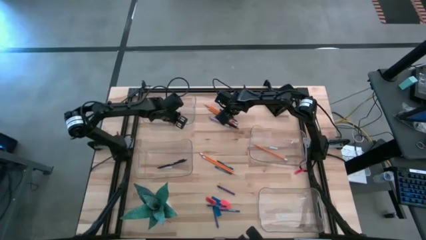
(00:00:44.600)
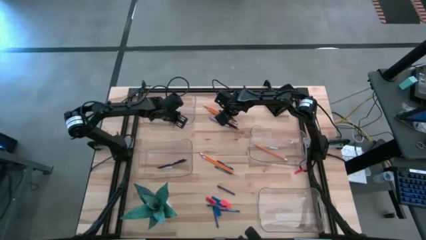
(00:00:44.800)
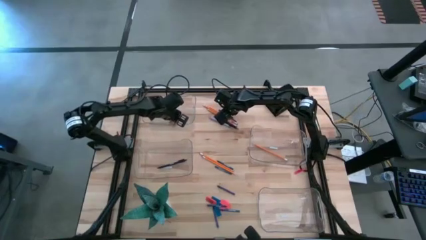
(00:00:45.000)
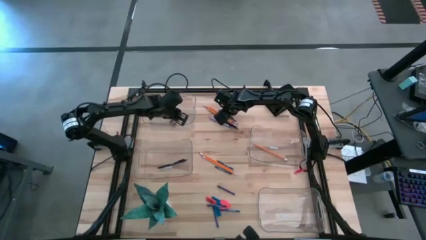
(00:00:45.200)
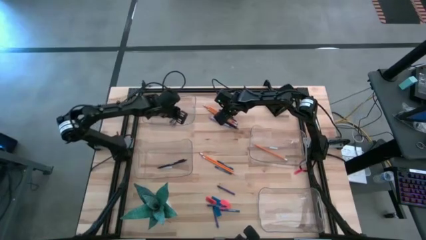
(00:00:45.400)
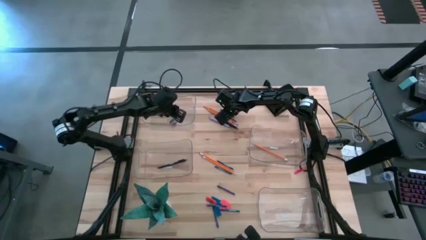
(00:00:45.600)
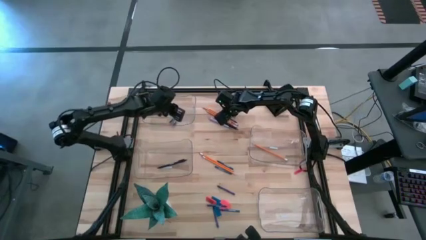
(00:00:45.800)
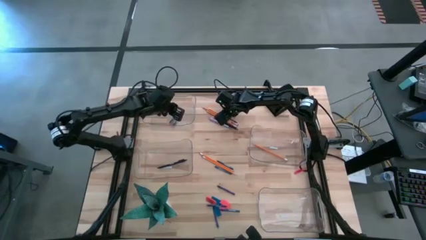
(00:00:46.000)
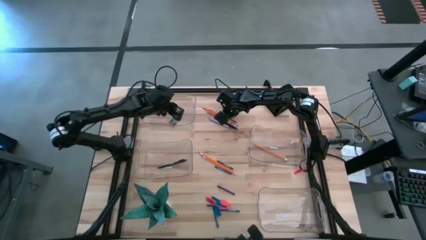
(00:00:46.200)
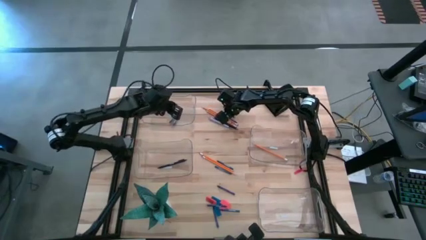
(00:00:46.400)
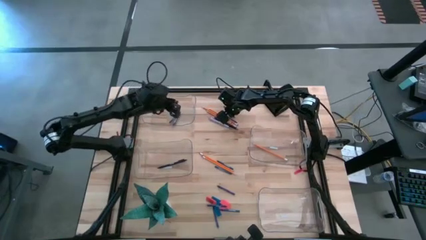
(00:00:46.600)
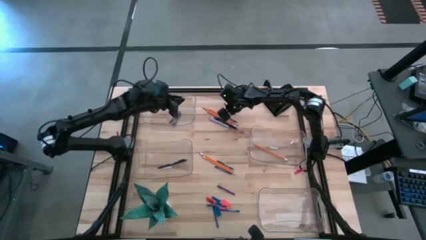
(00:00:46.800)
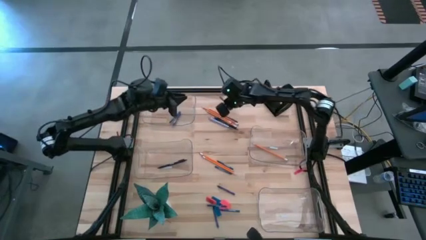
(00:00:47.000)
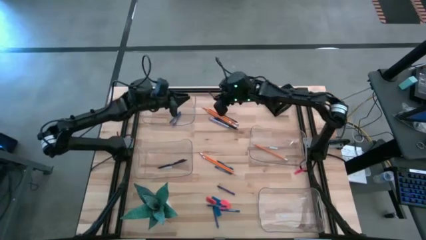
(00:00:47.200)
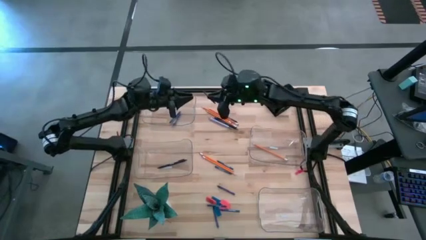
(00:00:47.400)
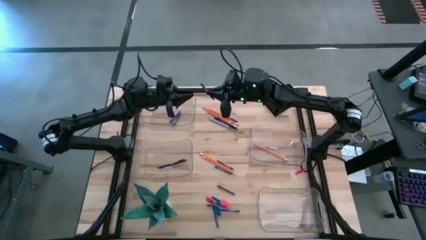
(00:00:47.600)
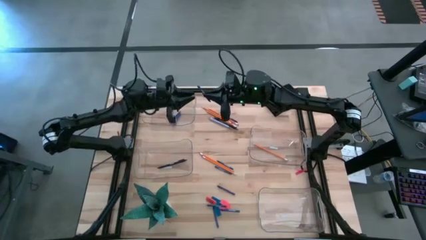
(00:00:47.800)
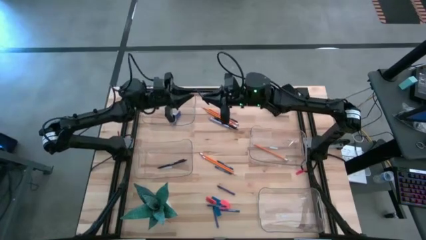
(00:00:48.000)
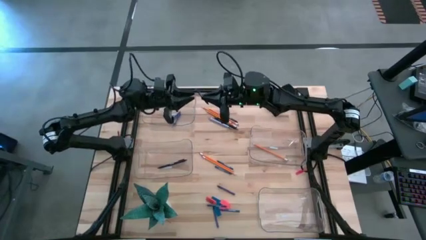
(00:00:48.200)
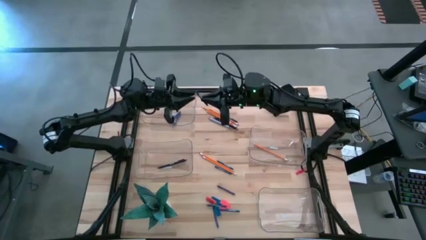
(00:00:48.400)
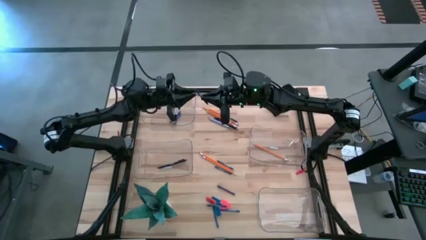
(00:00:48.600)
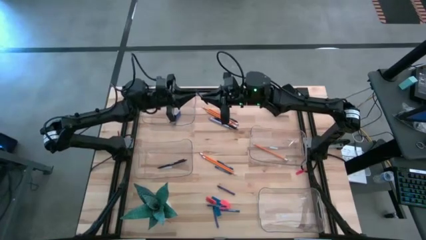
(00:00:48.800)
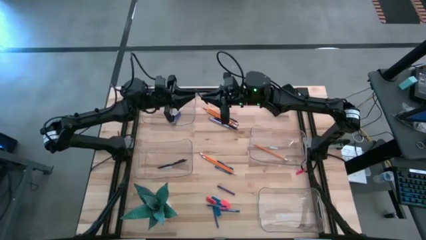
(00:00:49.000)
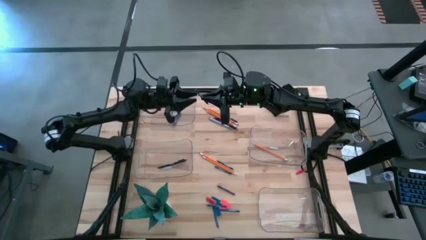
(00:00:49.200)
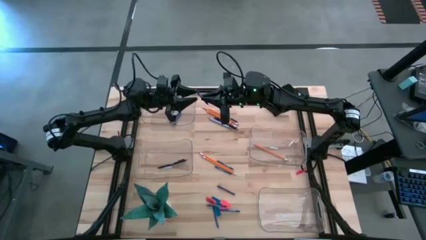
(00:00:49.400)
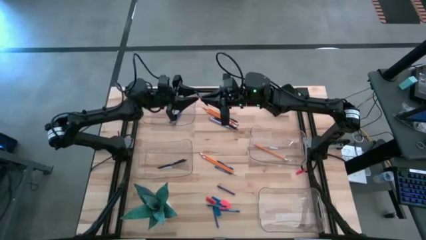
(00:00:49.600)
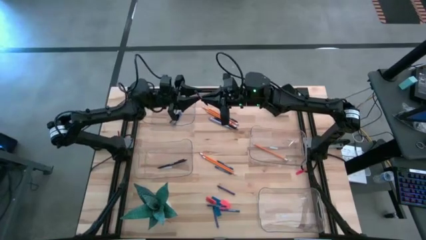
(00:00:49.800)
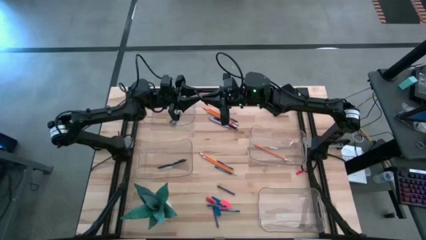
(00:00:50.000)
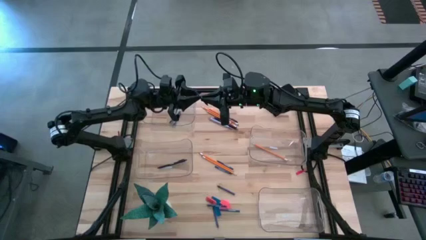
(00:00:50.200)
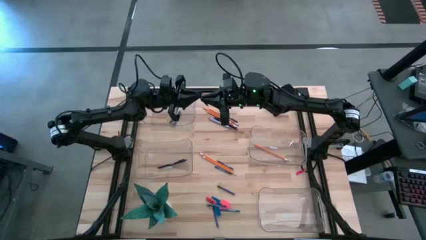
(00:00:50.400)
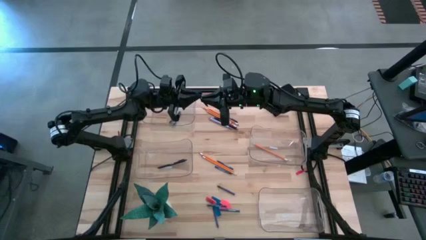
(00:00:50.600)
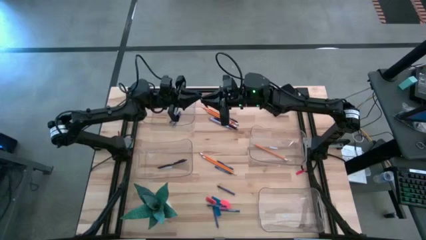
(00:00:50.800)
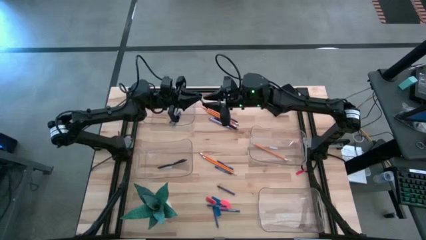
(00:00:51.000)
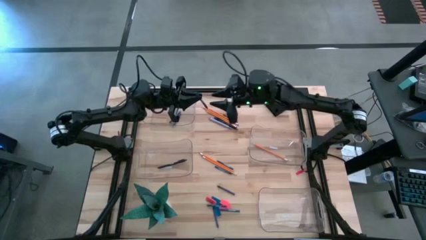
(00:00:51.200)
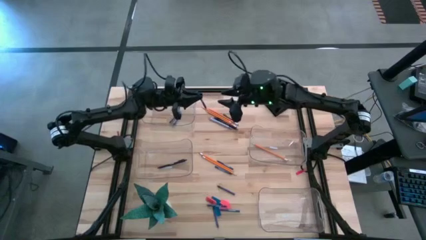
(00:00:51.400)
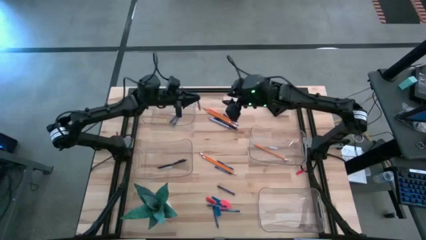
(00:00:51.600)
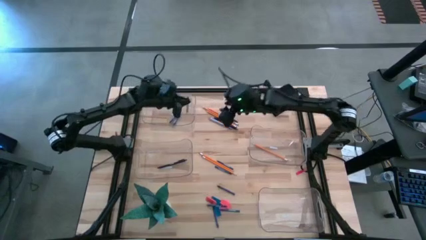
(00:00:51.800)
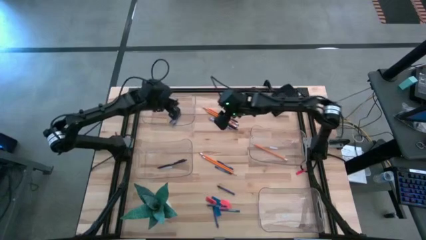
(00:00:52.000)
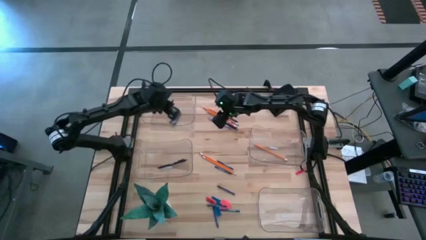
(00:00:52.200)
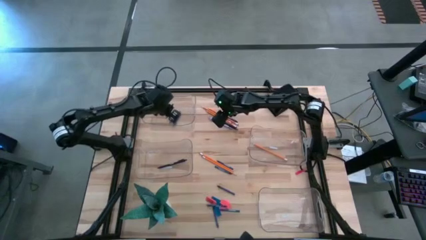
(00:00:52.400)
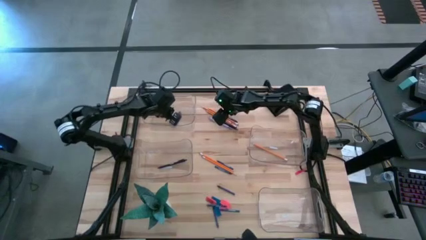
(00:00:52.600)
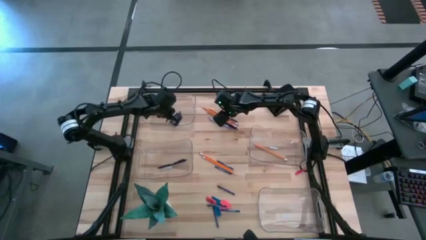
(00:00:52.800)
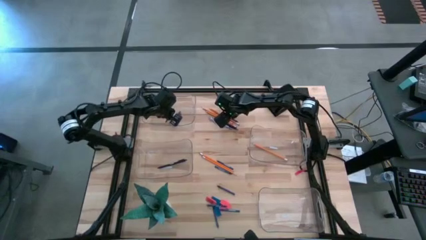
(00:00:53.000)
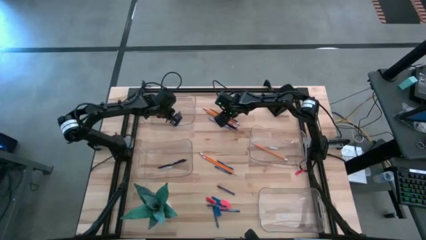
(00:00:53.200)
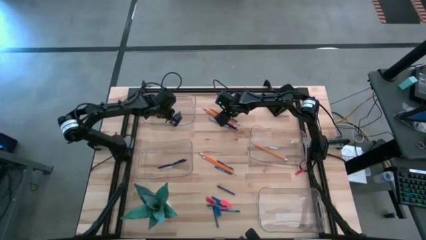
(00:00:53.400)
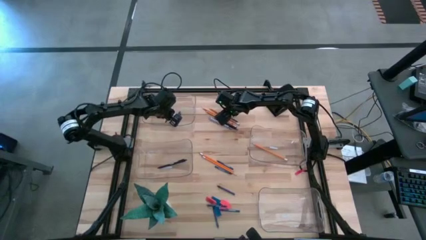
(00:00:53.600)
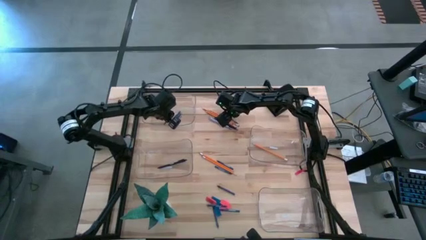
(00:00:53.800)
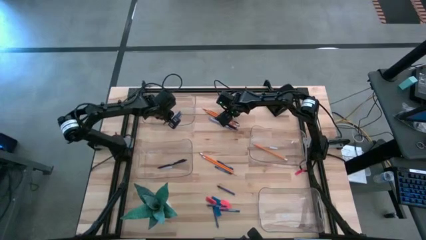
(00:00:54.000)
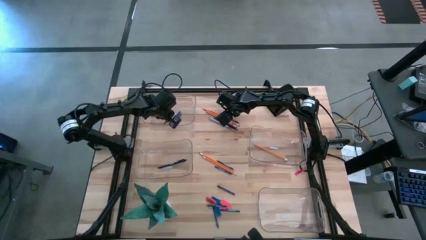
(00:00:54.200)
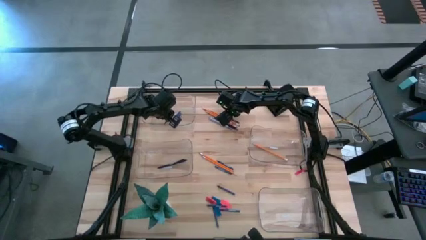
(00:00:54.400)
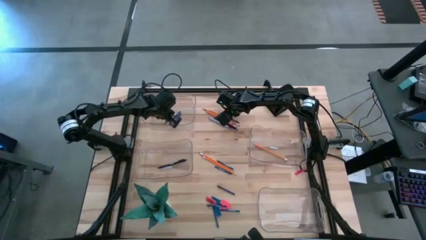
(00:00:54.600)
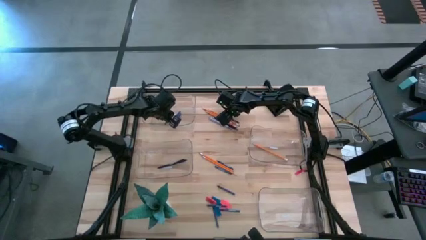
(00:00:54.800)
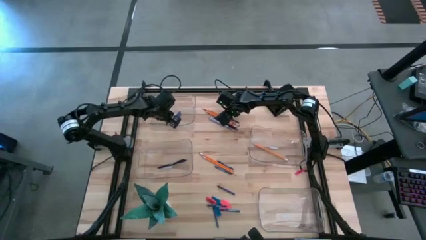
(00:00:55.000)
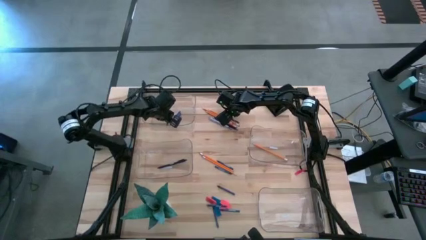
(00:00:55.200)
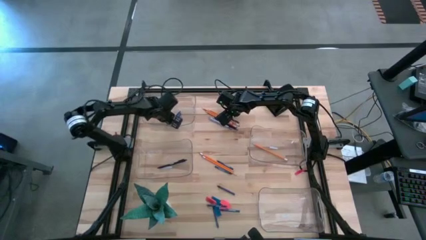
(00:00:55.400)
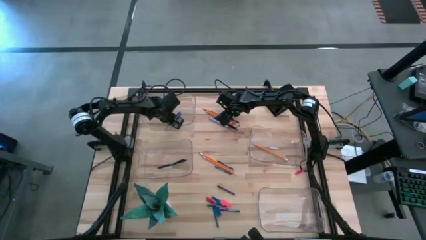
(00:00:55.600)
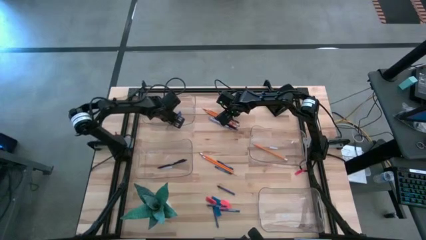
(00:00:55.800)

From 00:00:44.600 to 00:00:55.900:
Task: Sort crayons/erasers/pens/pencils in bins
Put the blue crayon into the top transparent bin

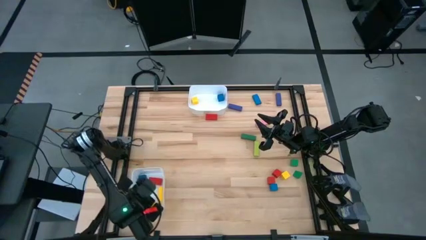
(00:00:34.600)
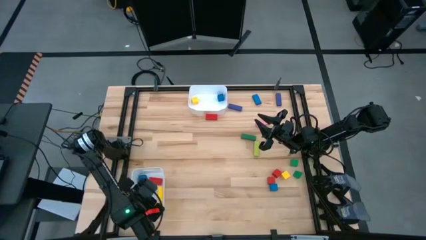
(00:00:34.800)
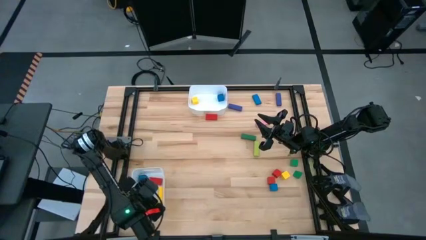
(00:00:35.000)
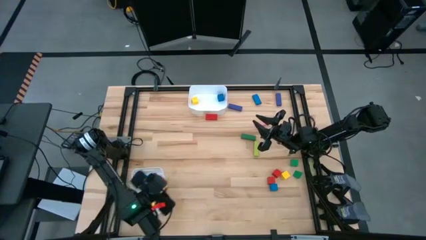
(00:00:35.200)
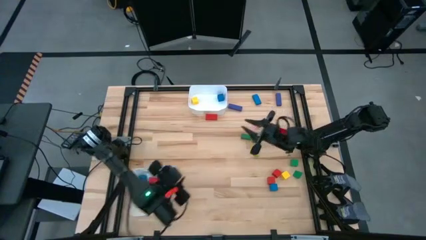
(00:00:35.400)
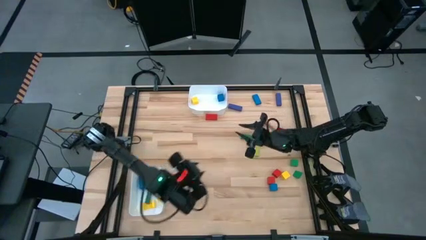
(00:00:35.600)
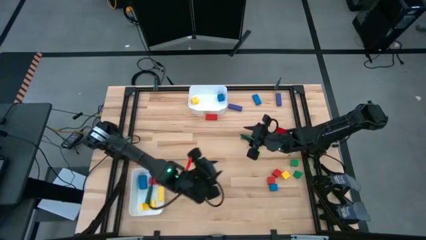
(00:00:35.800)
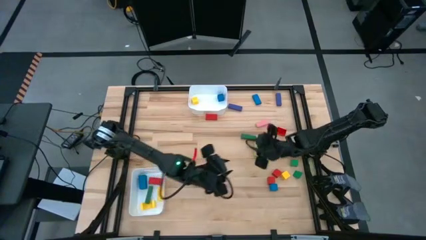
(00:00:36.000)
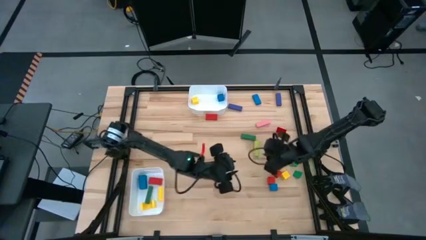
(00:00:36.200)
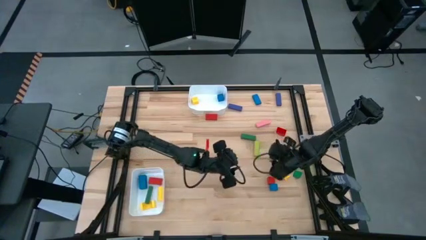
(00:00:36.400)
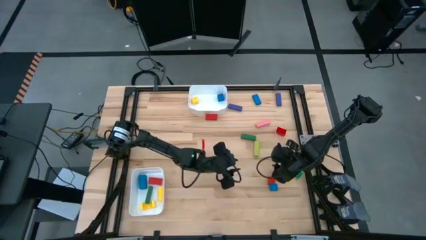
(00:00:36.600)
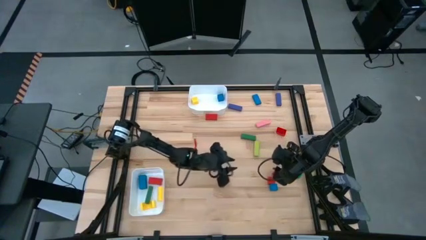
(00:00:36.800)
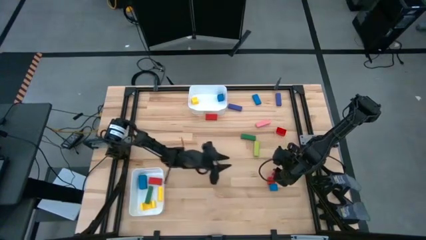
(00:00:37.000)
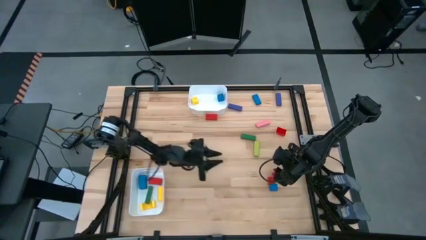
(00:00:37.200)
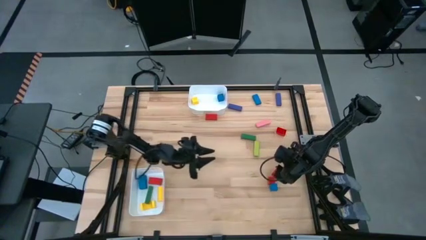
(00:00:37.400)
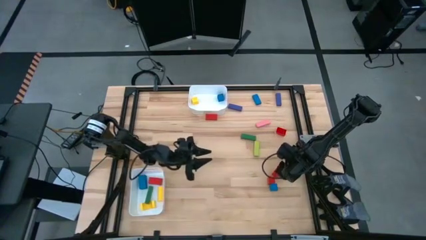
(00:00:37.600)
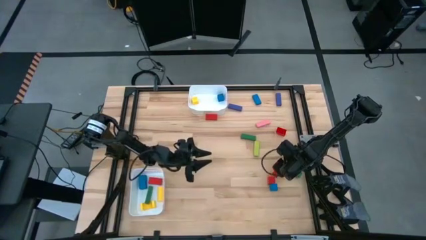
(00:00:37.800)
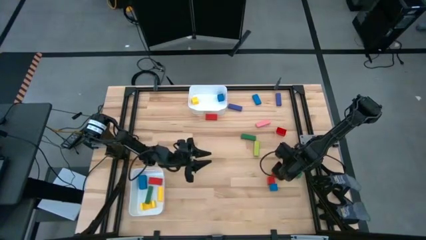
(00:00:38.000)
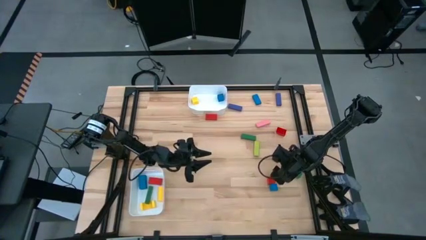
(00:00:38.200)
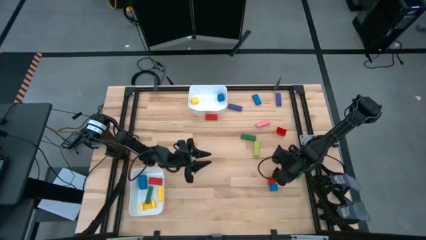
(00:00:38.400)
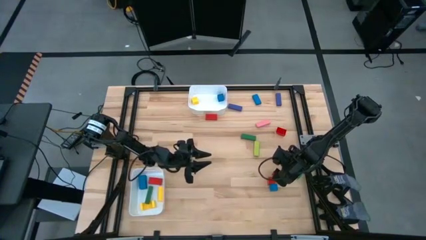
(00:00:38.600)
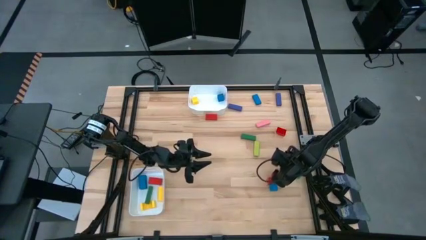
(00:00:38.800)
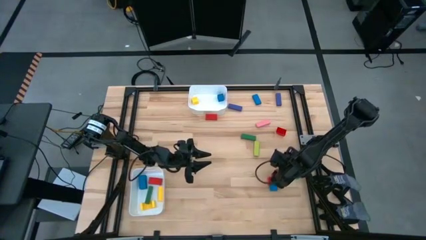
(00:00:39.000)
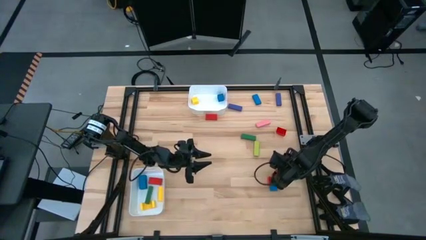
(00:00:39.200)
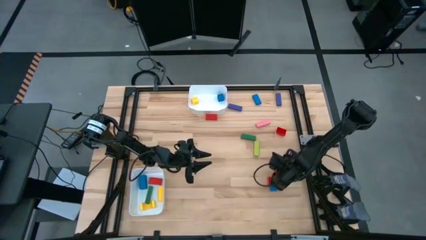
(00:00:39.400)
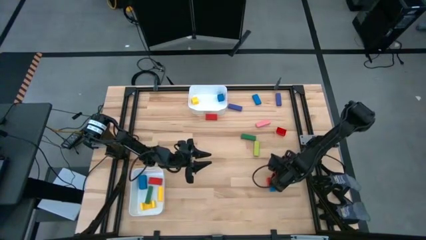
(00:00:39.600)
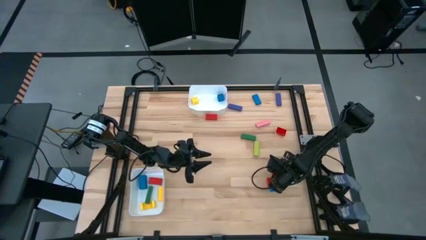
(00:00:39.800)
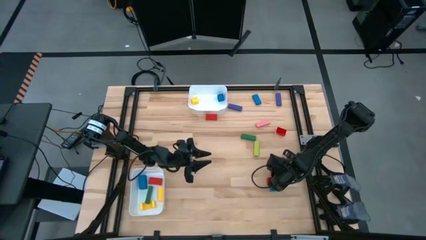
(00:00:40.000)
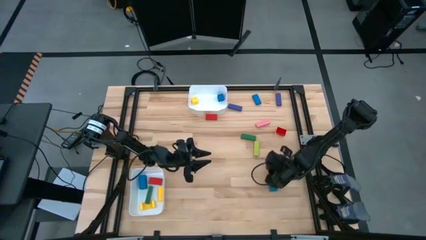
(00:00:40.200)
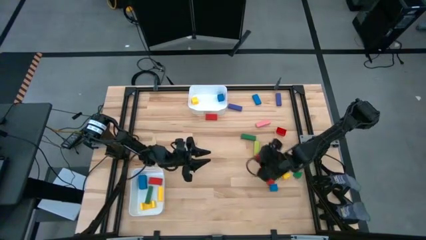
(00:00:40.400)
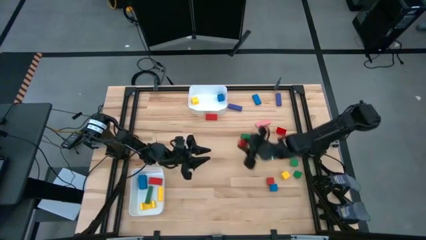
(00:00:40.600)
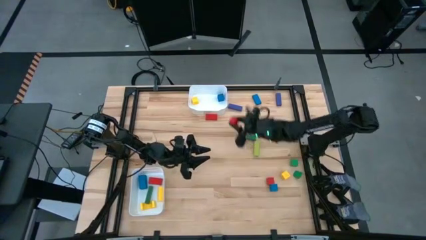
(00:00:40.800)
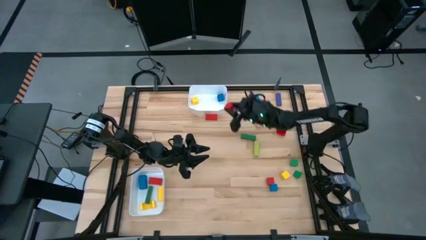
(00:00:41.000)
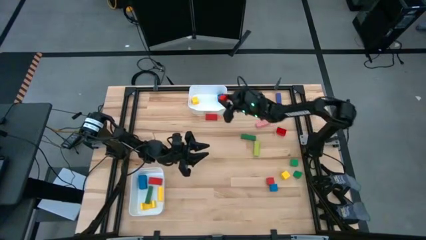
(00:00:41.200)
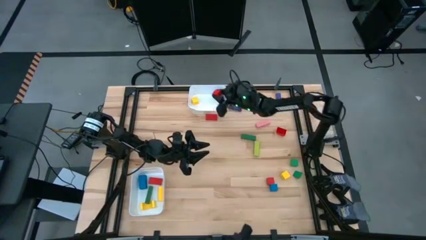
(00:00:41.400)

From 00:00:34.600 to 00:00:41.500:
Task: Sort blocks by size
Put the red cube block into the top white bin
